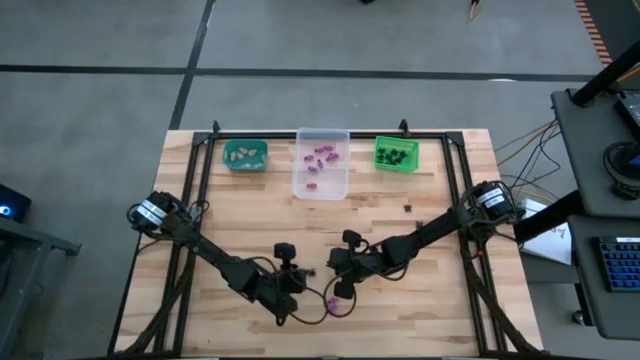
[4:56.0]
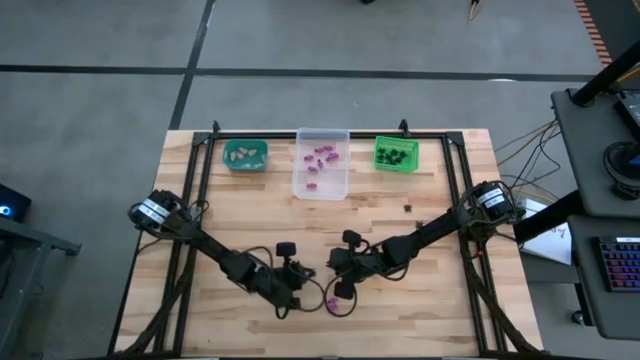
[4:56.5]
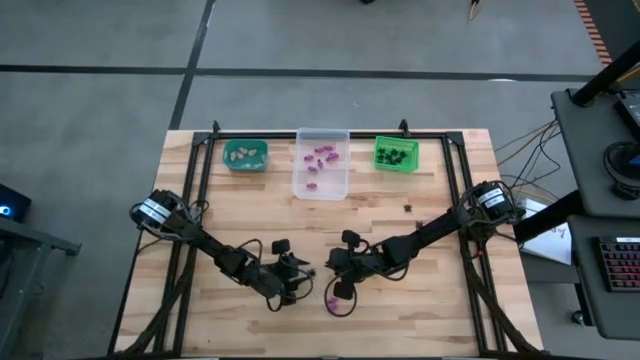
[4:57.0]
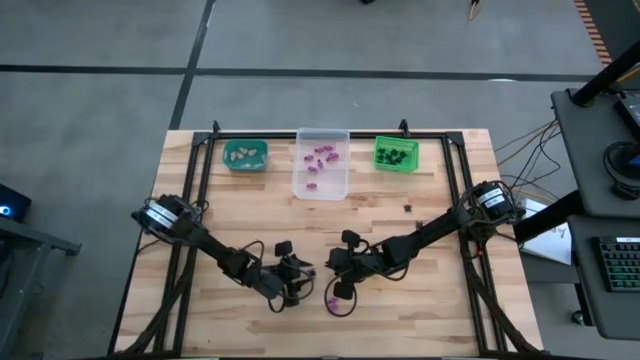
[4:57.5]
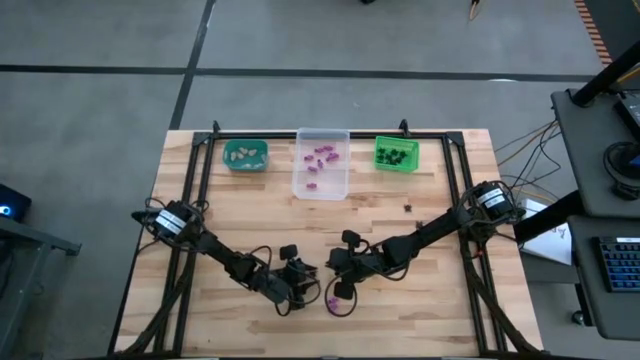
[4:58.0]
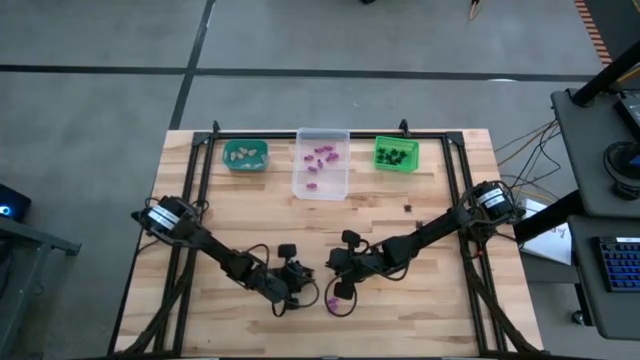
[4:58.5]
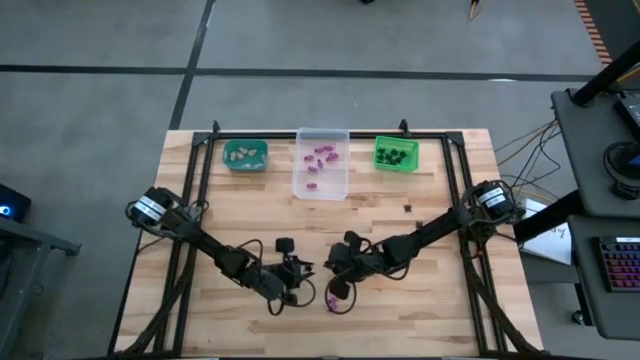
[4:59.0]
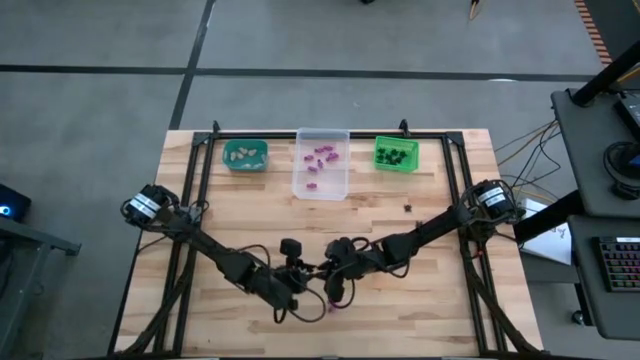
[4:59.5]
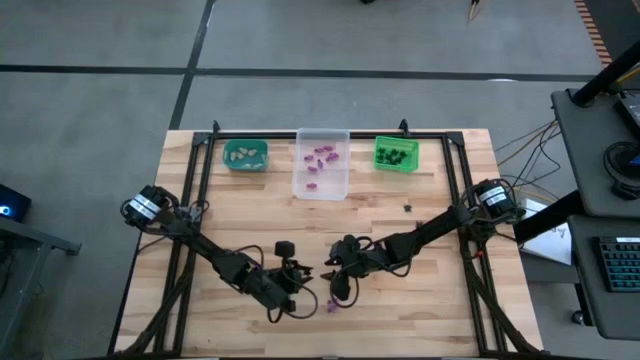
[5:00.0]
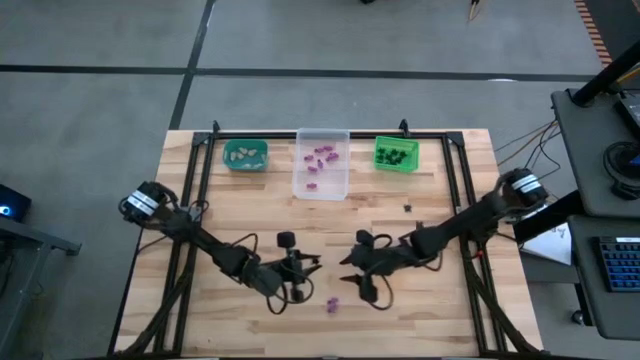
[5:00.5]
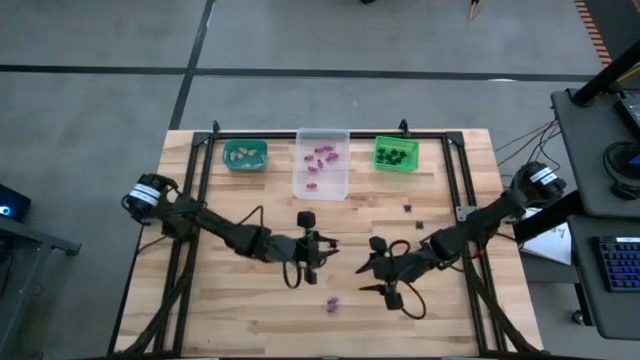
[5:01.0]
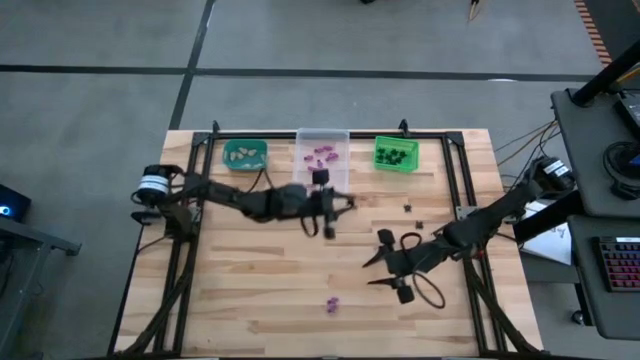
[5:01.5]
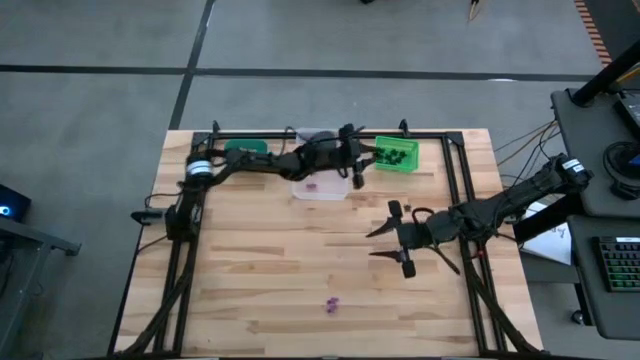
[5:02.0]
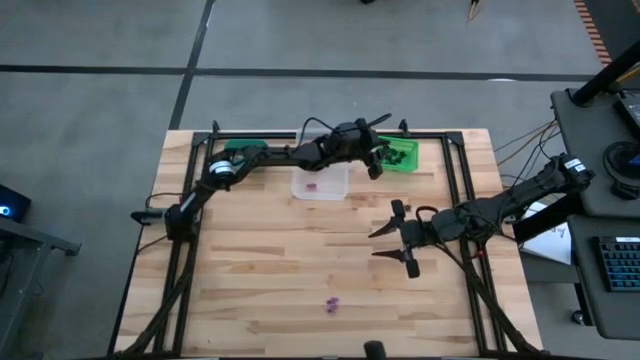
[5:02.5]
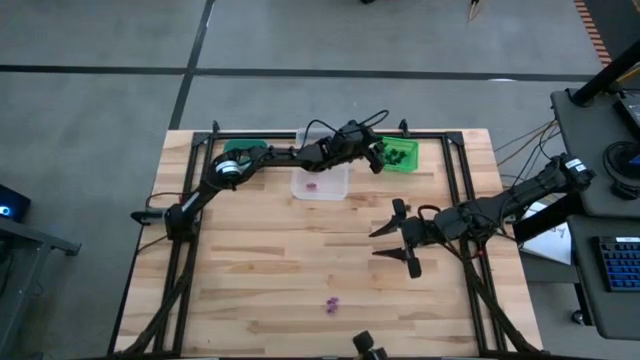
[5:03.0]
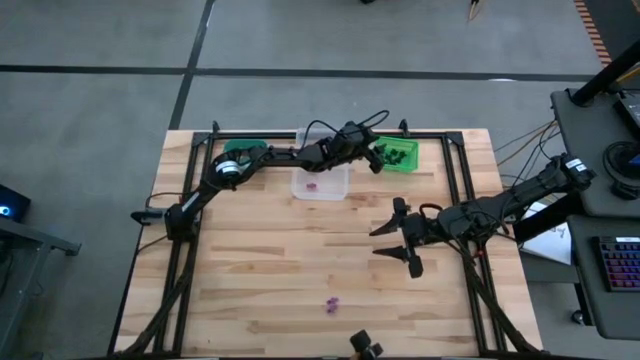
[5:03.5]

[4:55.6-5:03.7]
Task: Sort Halloween decoration
Put the black spider toy into the green bin

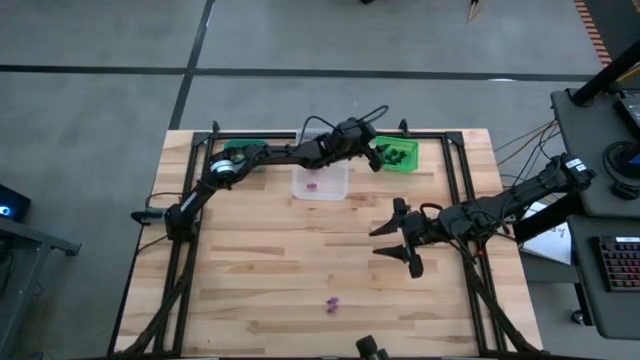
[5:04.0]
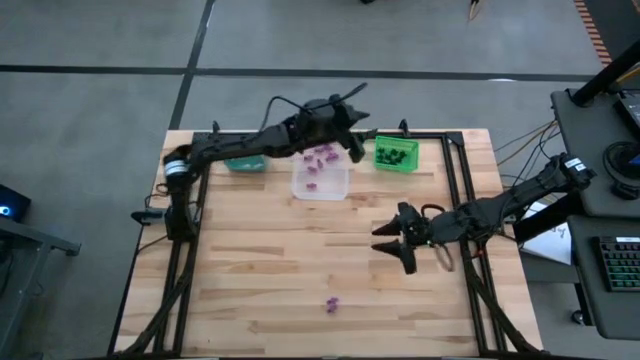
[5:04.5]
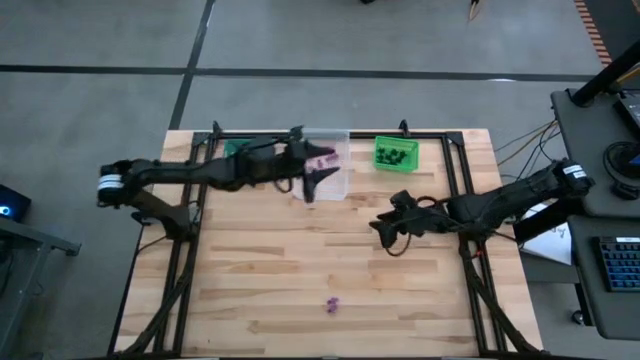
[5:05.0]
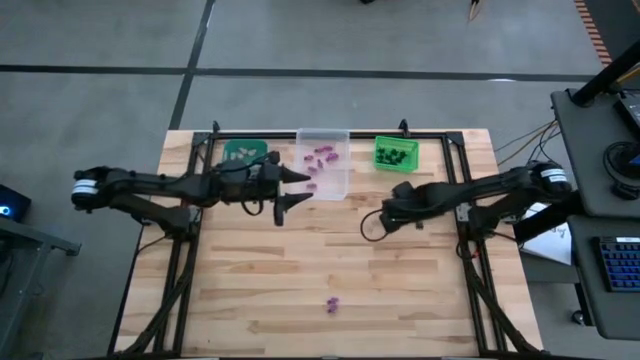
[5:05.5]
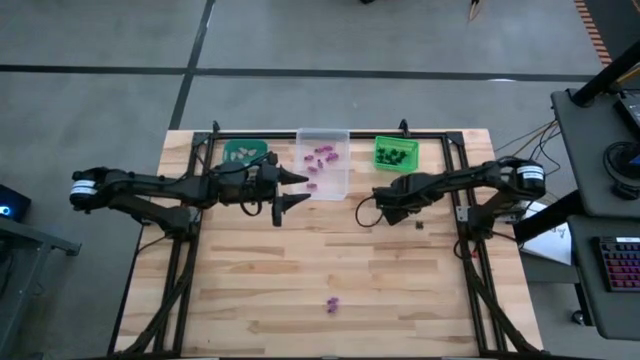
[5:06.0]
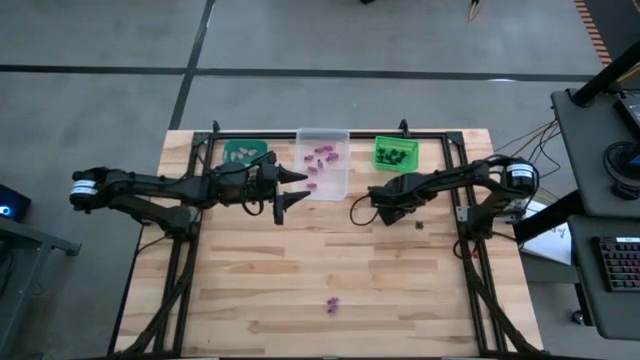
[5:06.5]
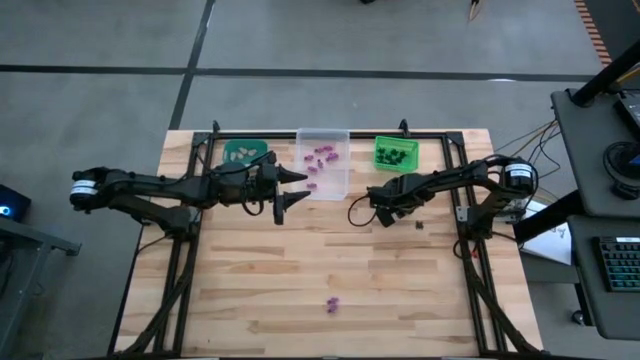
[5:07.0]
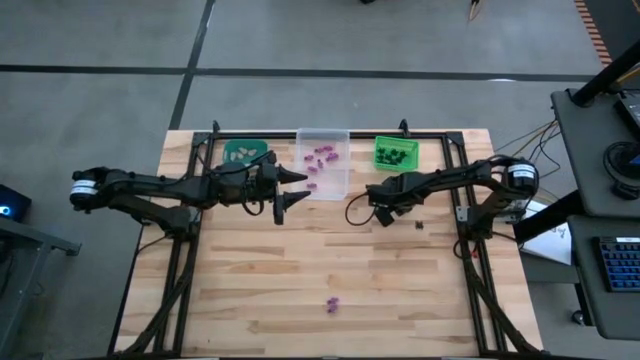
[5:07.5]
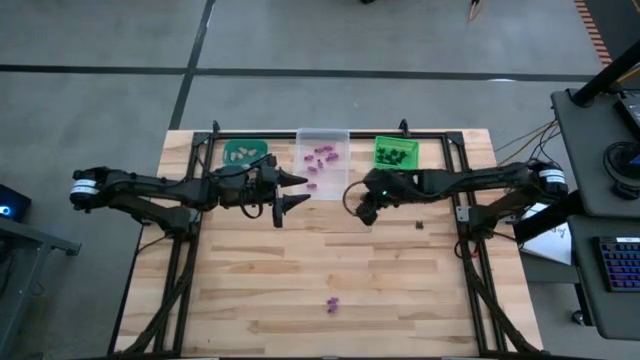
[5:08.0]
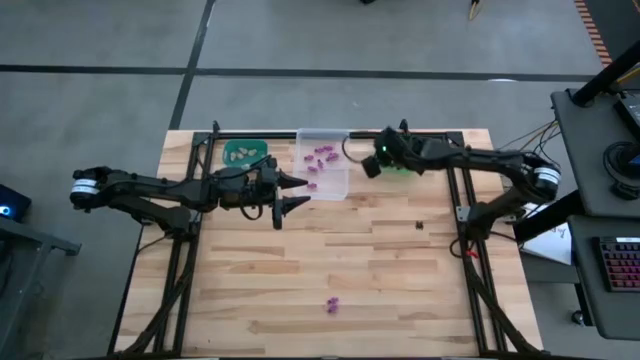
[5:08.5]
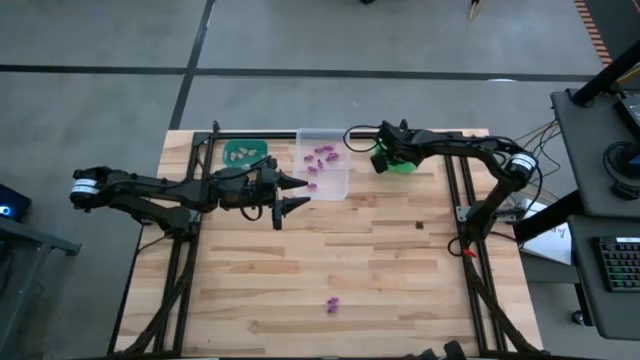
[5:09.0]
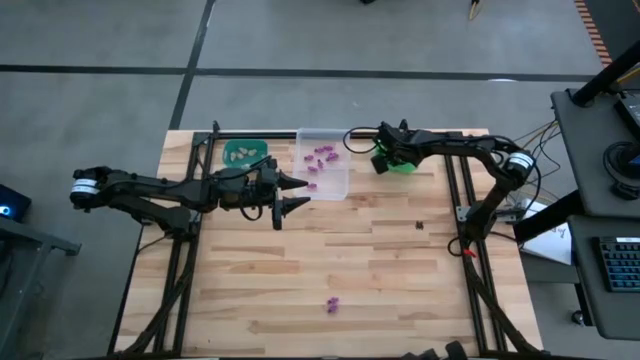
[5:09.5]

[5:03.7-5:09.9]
Put the black spider toy into the green bin

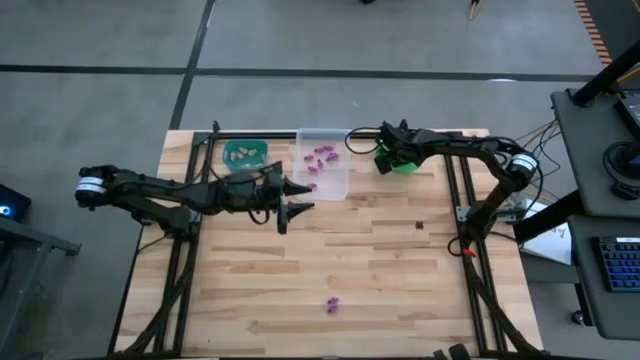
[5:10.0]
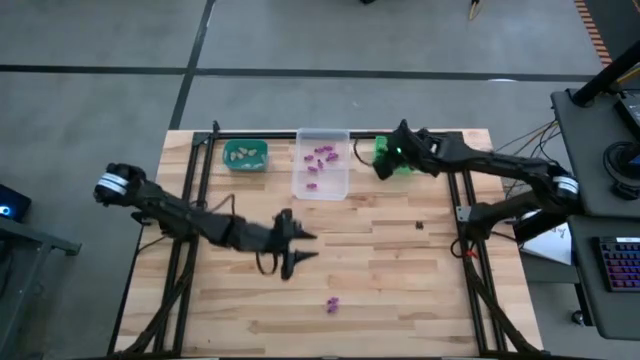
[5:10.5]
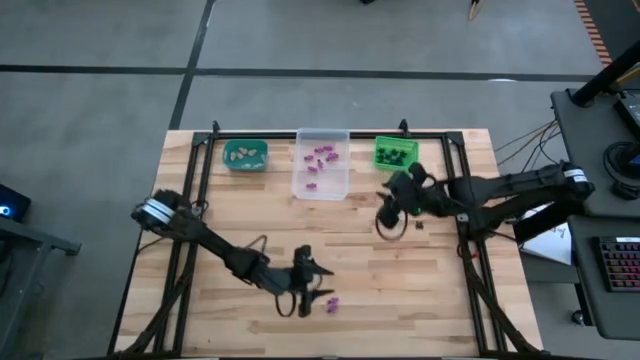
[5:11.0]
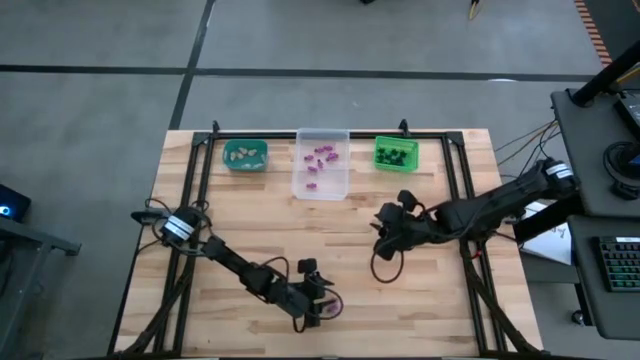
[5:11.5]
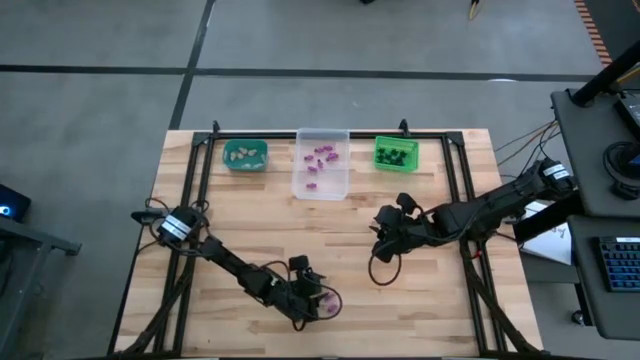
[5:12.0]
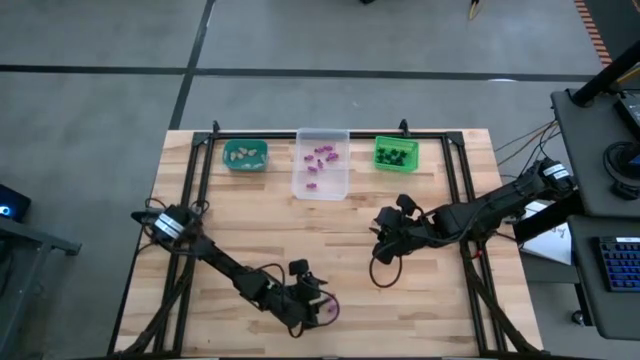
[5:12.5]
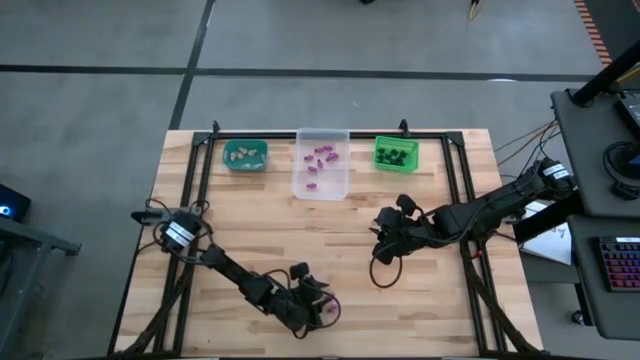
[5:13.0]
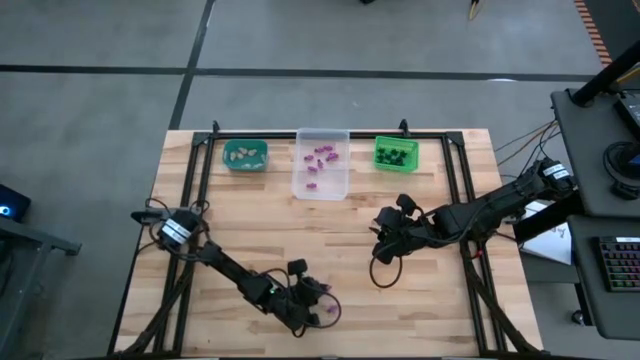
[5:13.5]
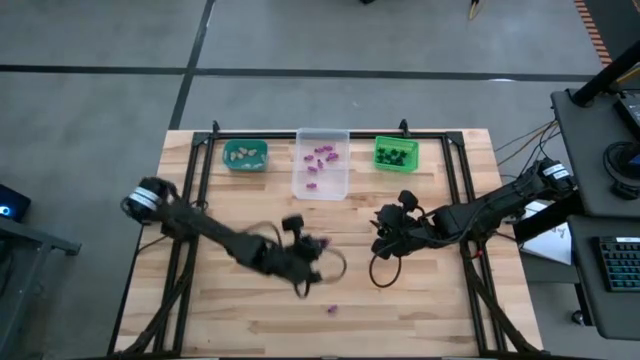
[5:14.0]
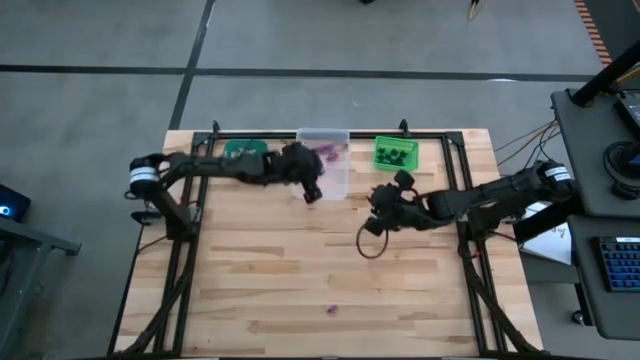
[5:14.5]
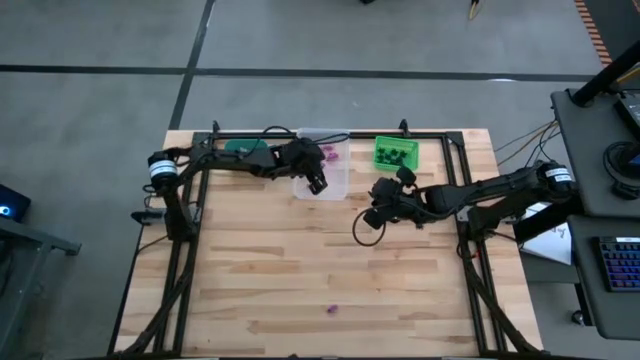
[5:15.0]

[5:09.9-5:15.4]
Put the violet skeleton toy into the transparent bin

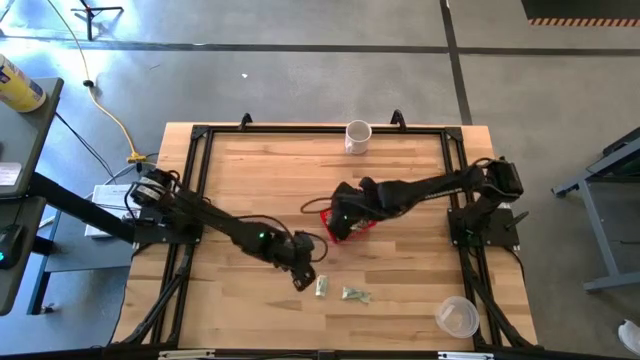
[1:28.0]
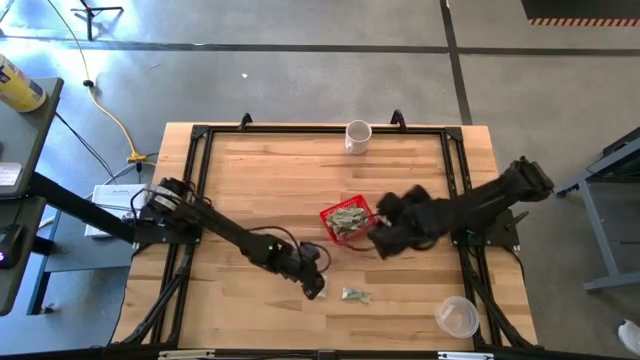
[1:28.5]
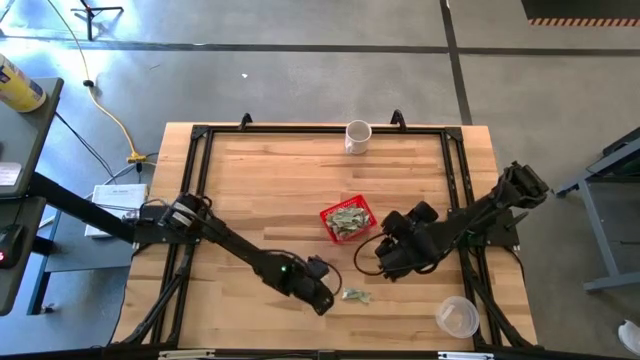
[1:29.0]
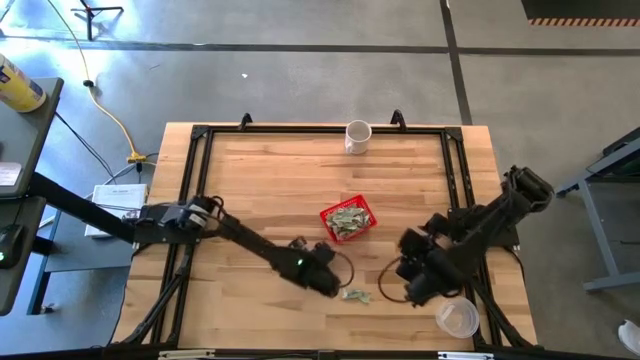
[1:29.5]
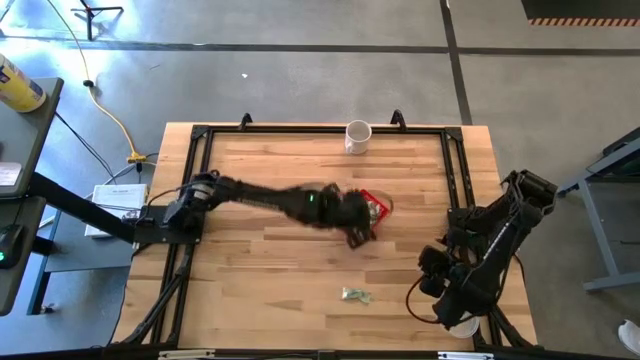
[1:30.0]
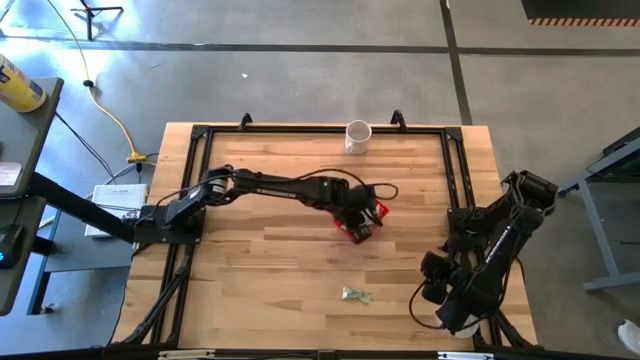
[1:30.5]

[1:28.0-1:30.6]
Task: Pick and place items into bin
Put the white stevia packet into the red bin
